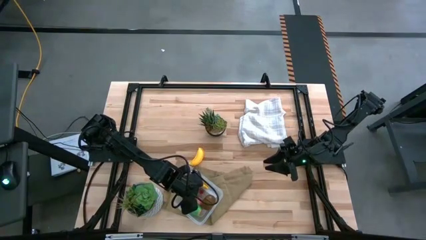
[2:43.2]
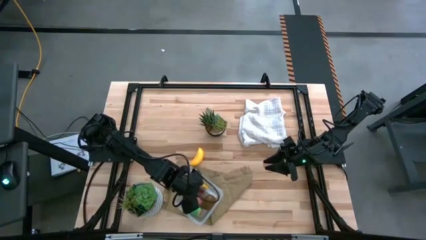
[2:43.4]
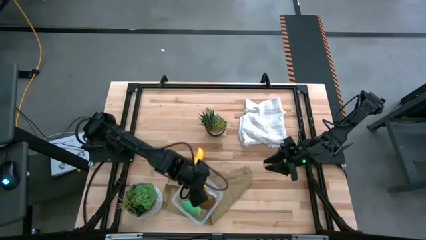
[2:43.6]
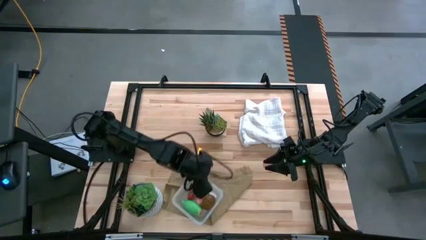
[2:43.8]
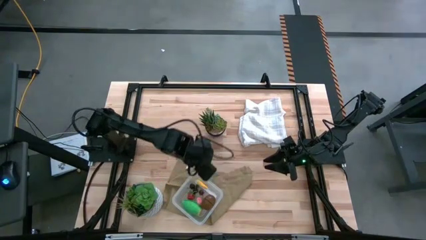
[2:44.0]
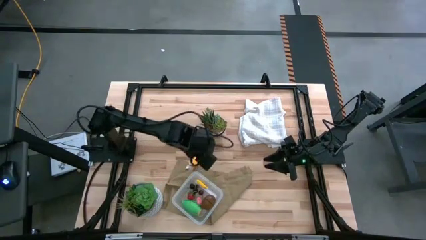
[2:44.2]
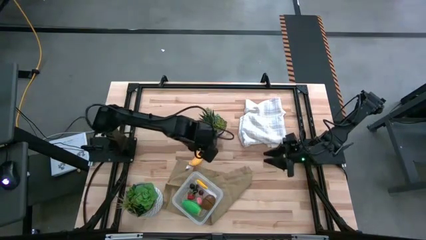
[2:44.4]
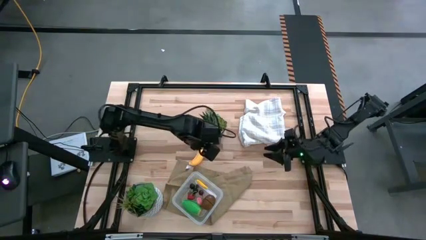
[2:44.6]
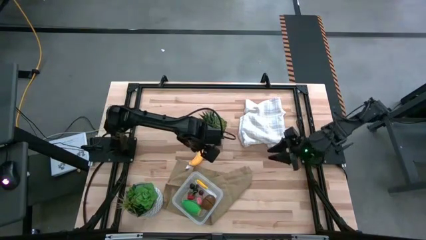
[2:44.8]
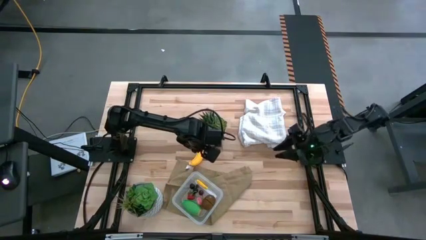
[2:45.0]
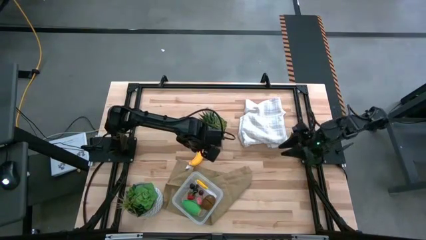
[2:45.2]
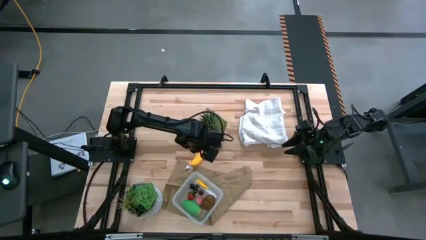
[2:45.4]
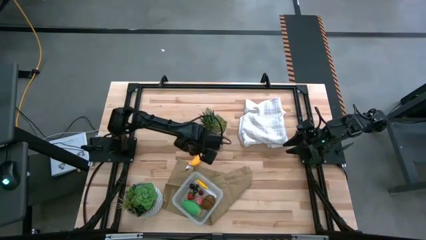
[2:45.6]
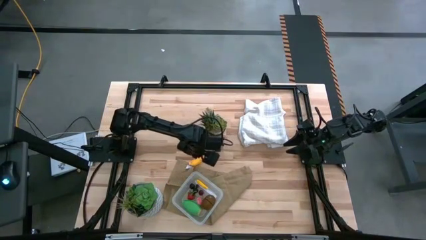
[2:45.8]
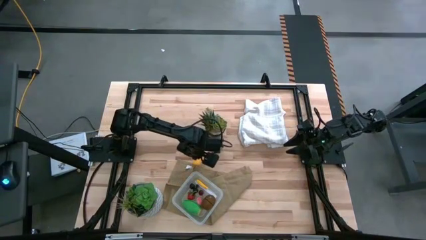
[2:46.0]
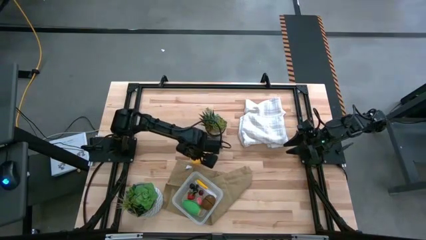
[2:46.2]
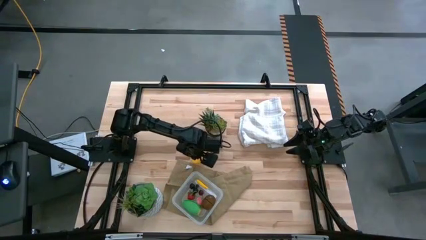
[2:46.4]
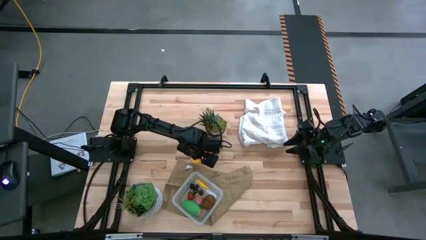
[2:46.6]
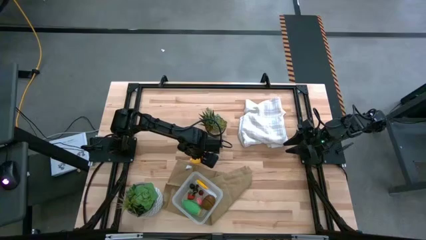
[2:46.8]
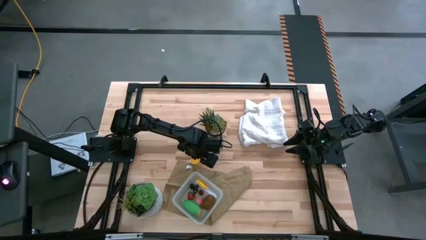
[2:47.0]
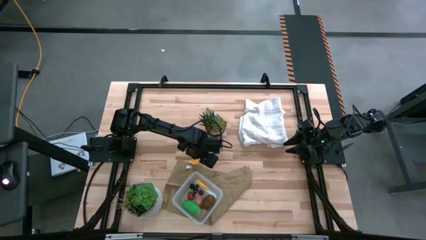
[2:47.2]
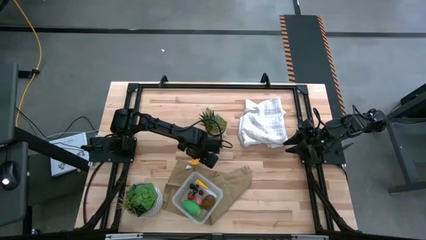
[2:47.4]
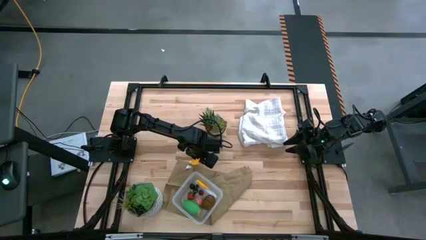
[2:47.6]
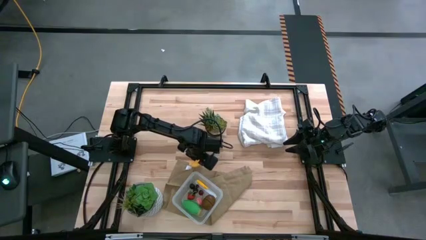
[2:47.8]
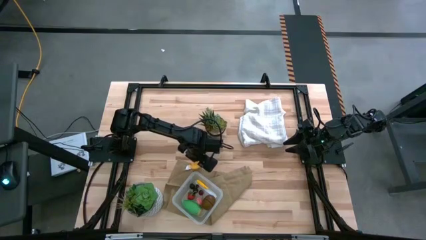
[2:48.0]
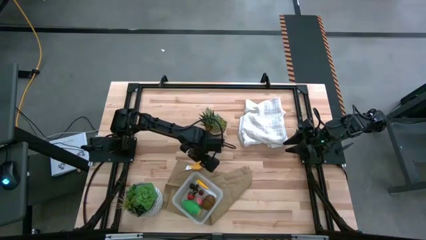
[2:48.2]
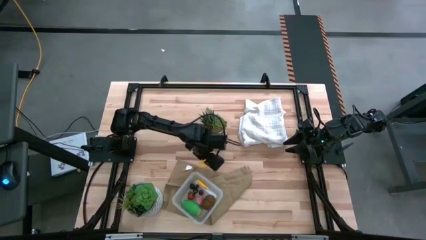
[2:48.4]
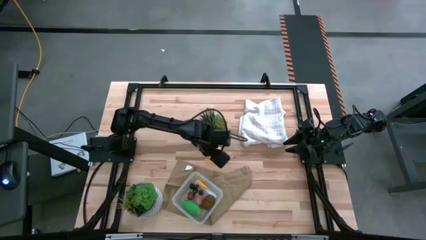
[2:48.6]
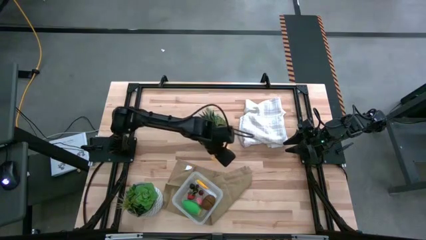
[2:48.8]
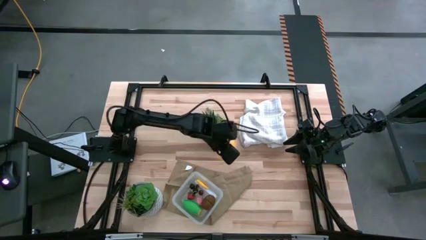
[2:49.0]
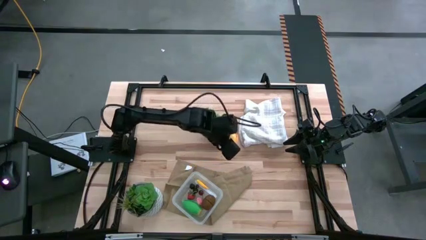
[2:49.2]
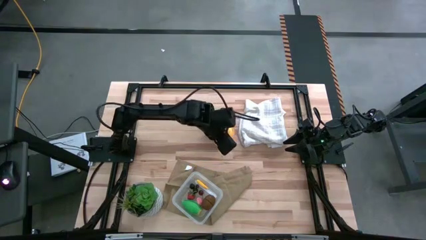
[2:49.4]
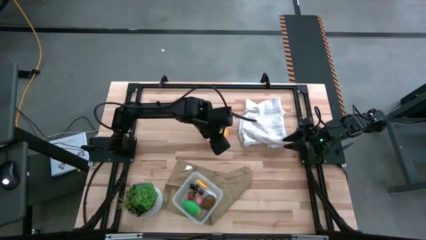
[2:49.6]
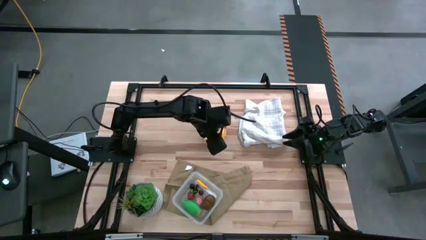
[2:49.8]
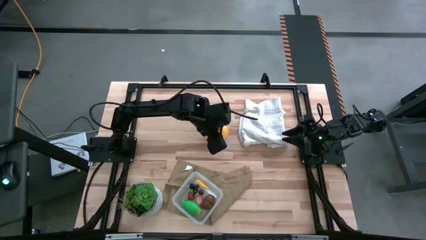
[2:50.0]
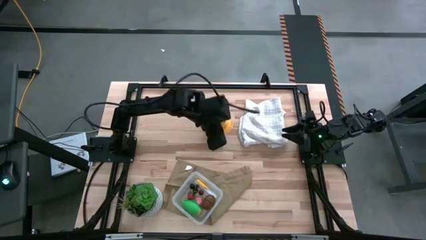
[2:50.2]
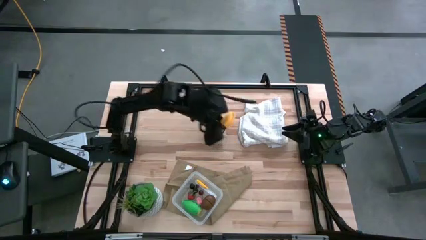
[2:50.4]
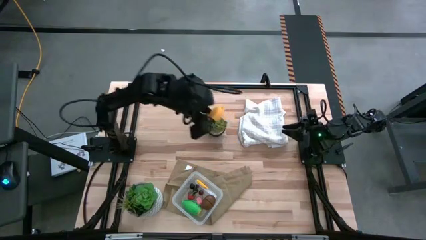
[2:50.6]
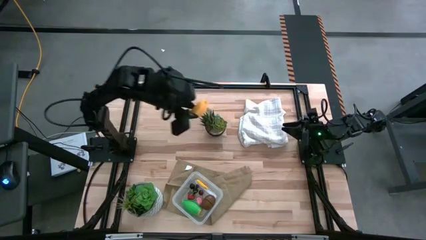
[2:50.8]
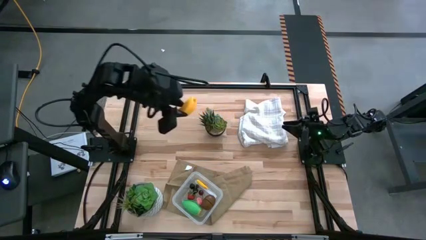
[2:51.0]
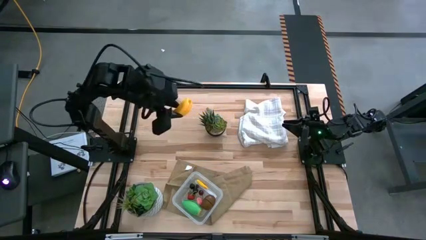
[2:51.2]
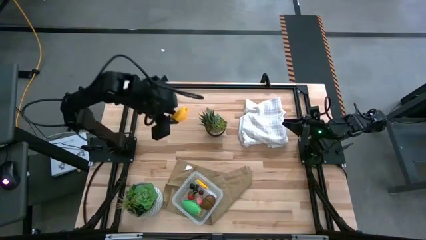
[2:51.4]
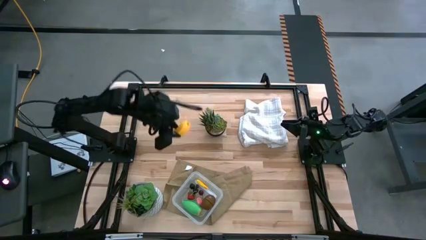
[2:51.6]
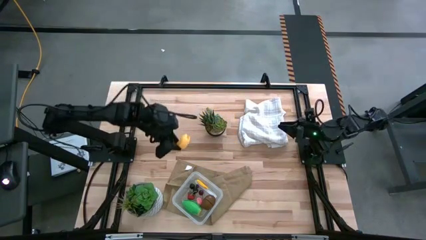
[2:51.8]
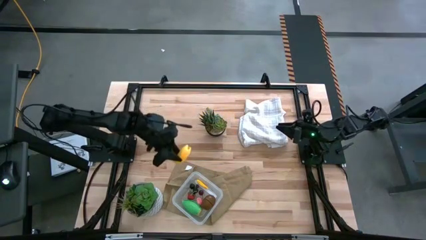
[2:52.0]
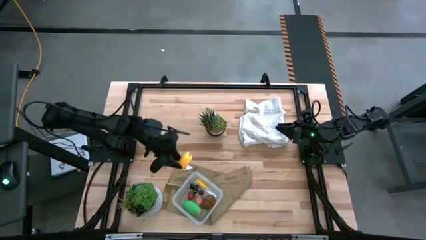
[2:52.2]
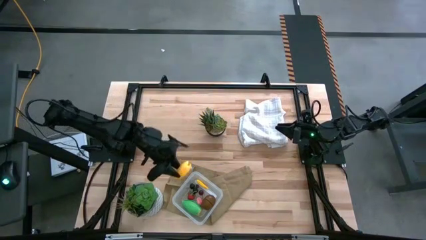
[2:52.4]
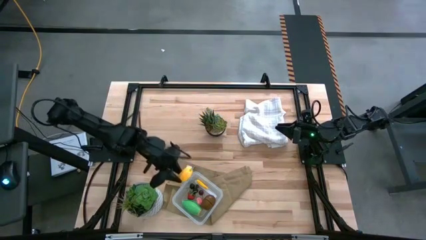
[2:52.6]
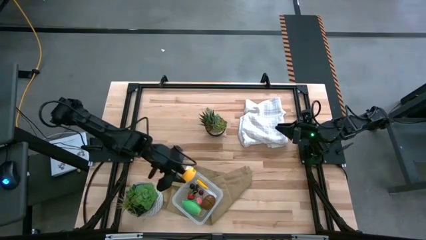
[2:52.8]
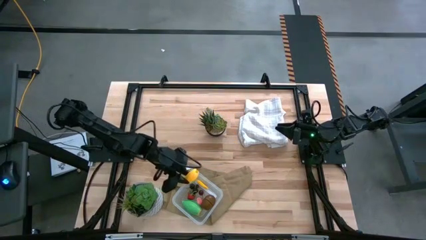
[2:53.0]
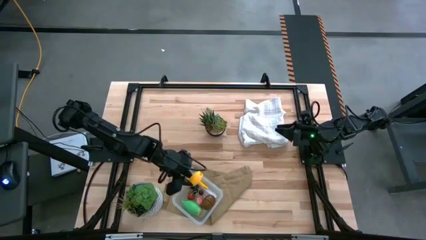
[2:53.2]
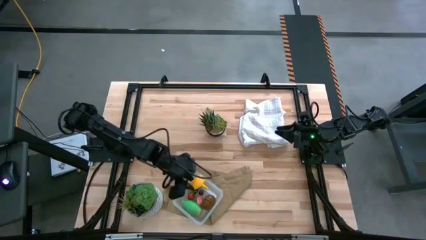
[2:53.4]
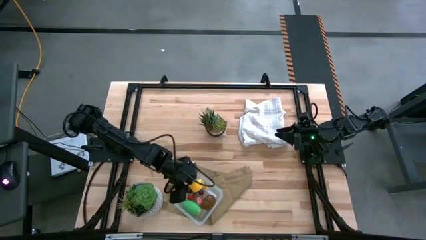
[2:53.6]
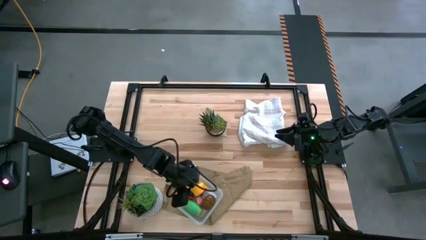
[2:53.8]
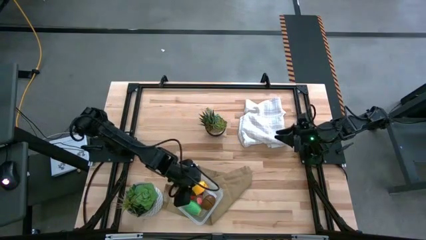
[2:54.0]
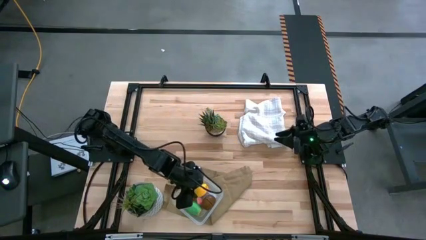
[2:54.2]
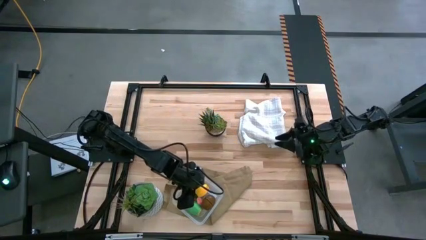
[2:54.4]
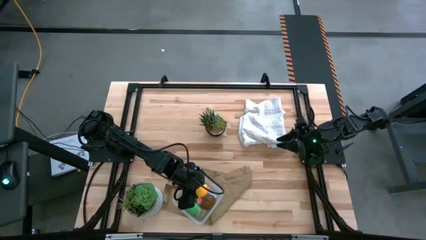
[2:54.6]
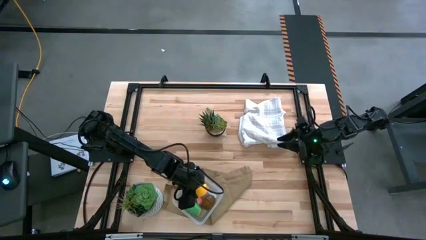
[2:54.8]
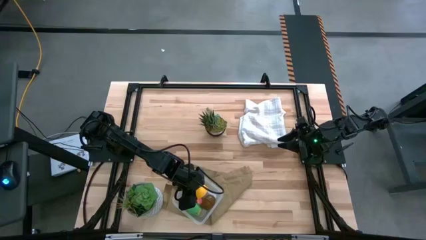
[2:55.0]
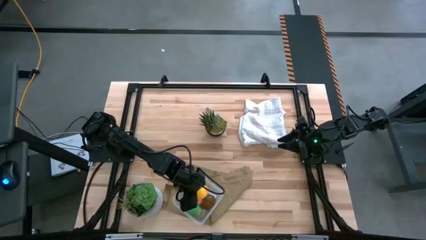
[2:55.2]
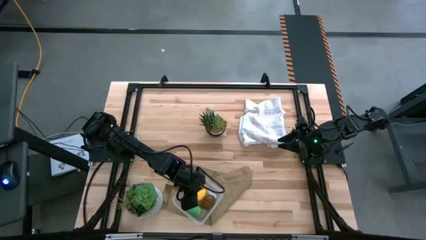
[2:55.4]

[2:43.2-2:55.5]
Task: Pick and placing Produce into tupperware
Put the banana into the container

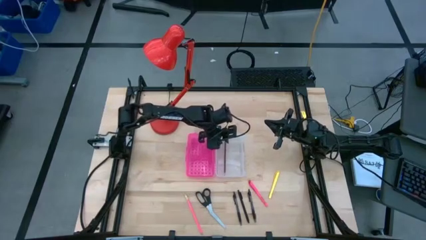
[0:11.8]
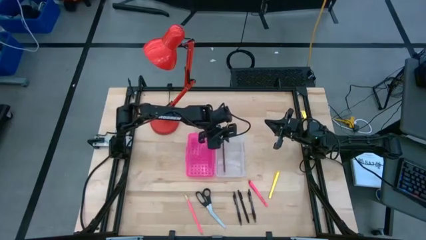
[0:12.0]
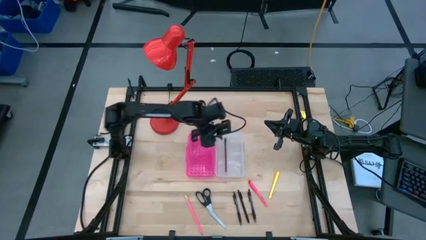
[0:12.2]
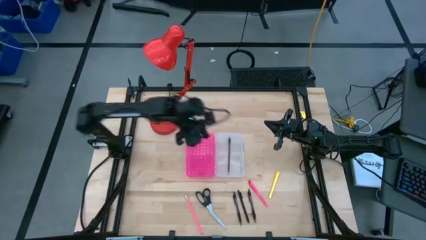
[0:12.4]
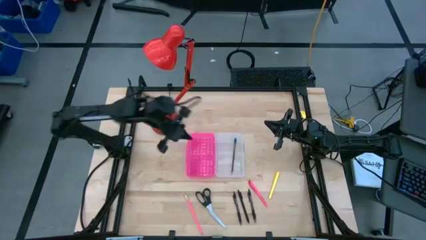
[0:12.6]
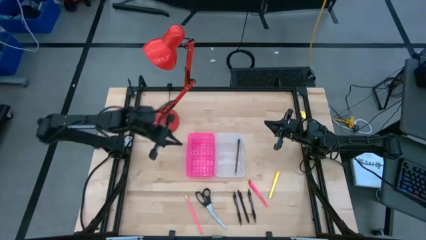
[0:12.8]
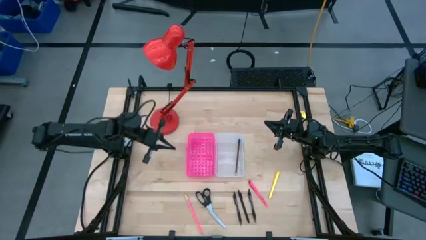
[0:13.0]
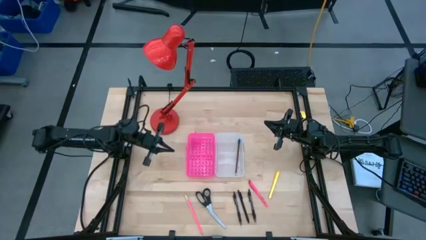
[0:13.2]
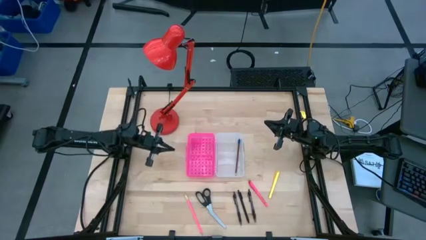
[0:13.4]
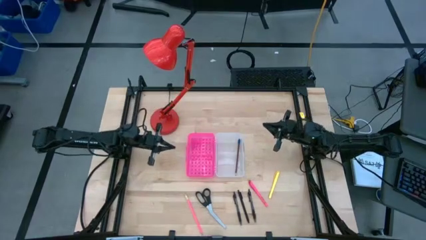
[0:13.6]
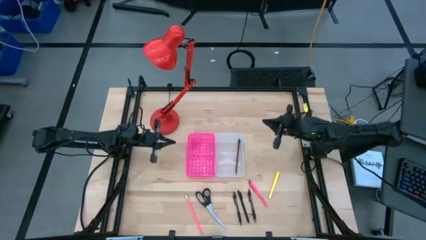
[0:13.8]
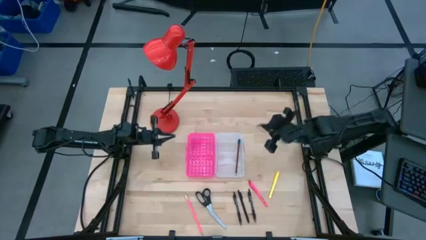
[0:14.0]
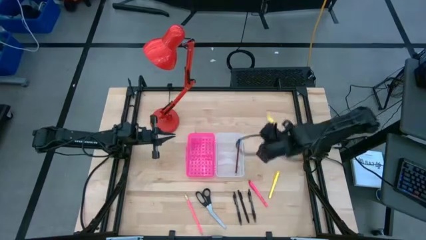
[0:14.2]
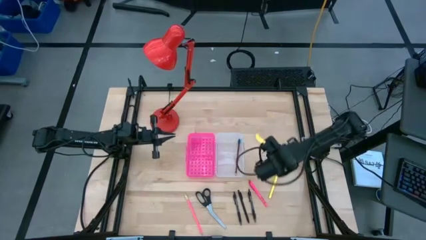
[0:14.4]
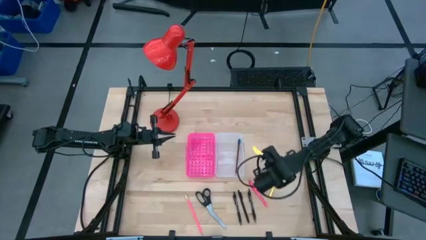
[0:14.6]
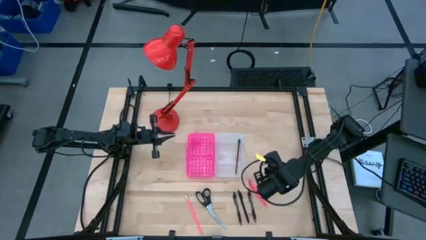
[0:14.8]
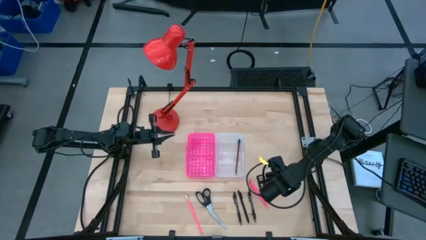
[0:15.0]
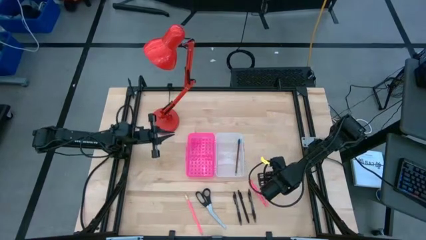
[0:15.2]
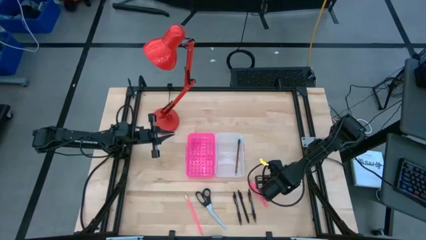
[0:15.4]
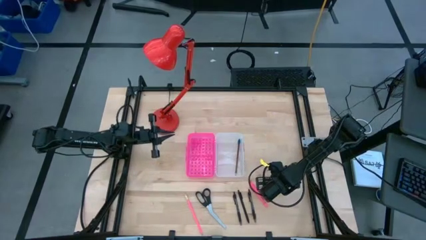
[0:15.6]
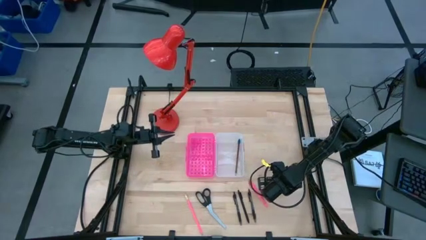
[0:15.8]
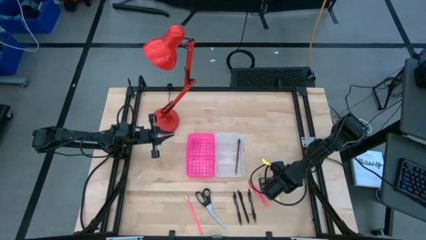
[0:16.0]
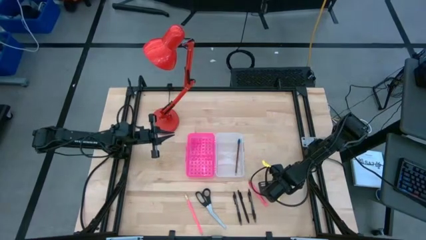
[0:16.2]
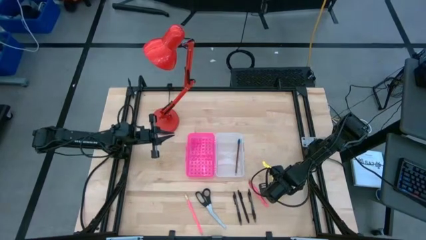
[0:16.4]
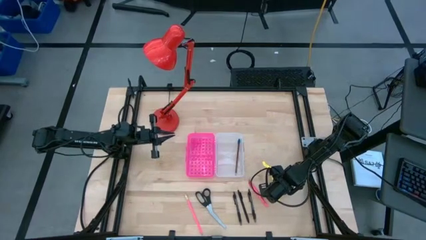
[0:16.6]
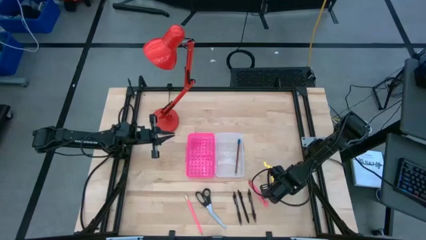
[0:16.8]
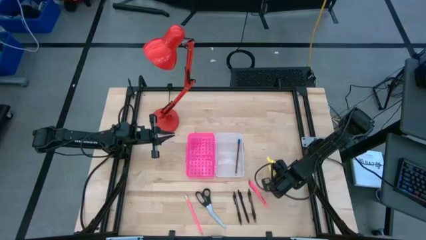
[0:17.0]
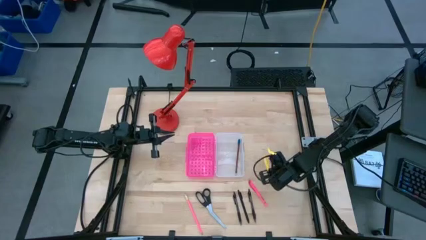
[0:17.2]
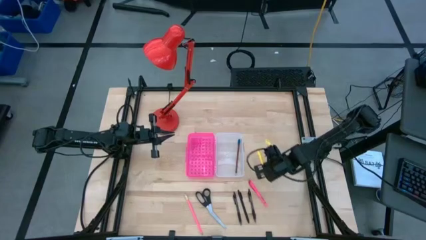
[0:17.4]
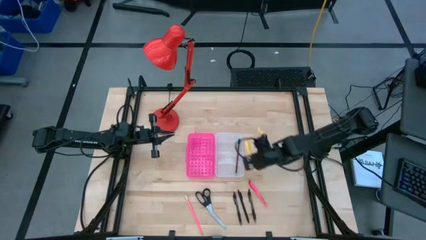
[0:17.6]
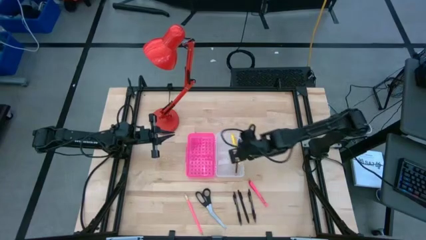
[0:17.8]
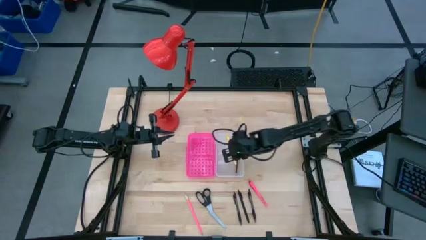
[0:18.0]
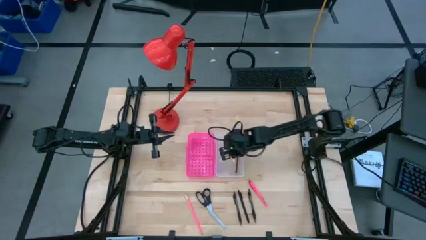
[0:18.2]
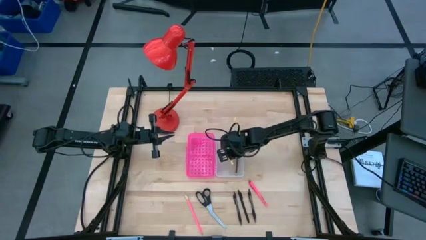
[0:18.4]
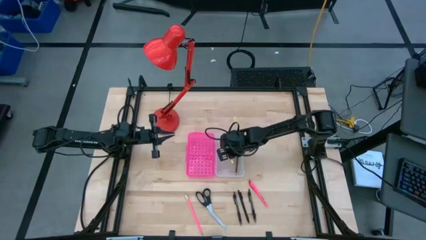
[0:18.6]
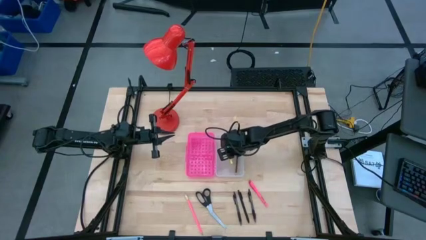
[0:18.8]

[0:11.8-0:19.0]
Task: Pick & place school supplies into a supply box
Put the yellow pen into the pink supply box
